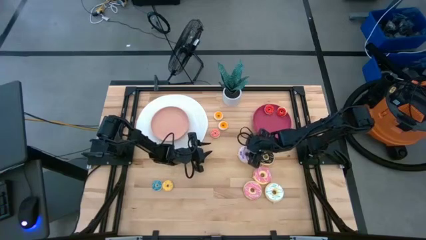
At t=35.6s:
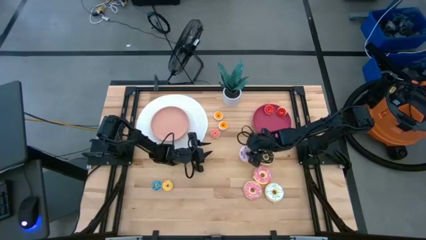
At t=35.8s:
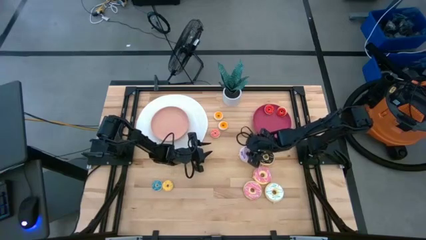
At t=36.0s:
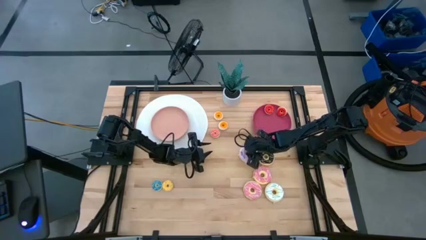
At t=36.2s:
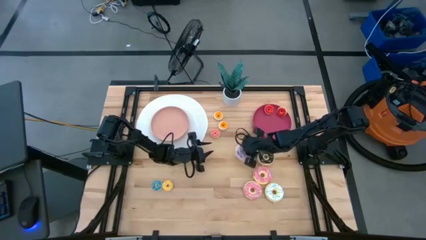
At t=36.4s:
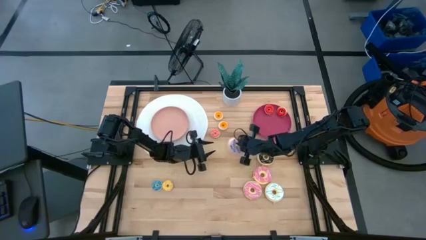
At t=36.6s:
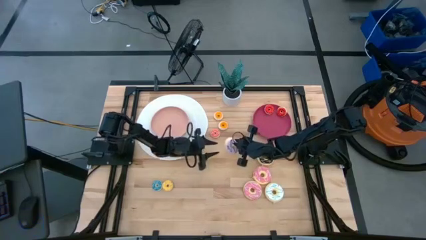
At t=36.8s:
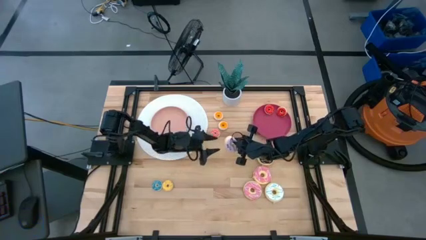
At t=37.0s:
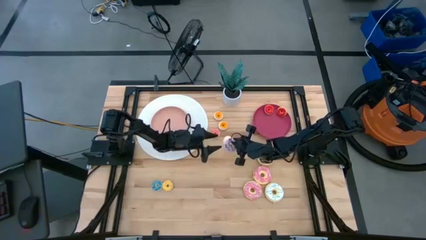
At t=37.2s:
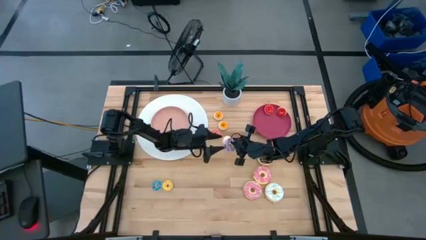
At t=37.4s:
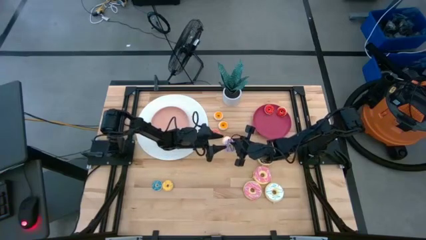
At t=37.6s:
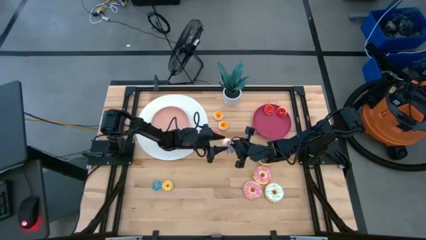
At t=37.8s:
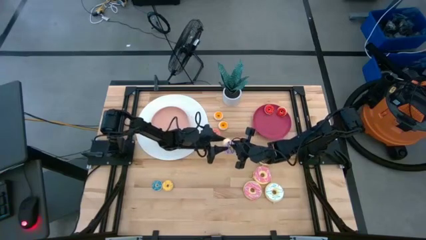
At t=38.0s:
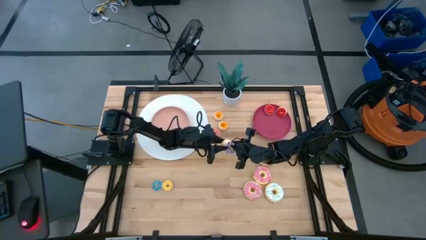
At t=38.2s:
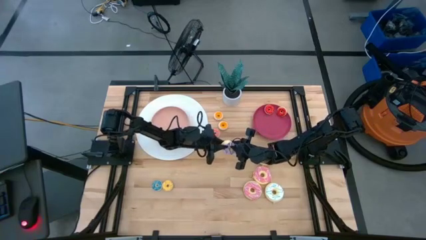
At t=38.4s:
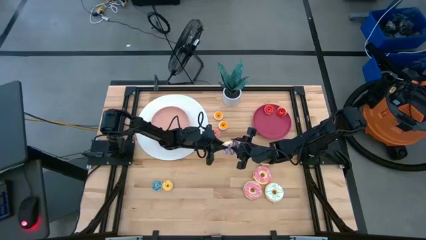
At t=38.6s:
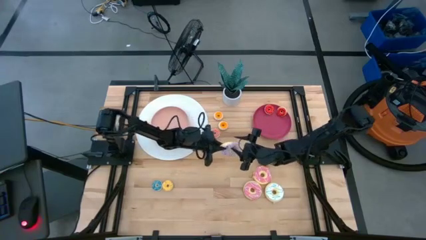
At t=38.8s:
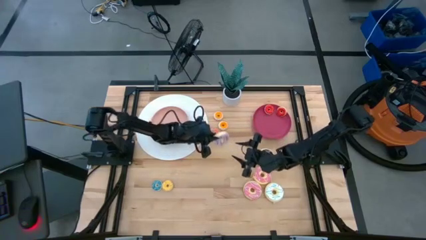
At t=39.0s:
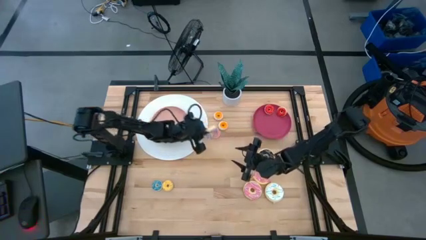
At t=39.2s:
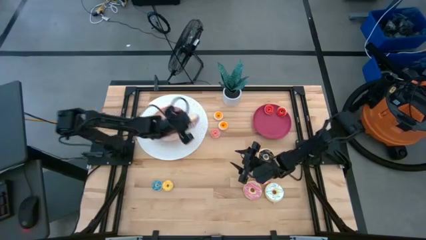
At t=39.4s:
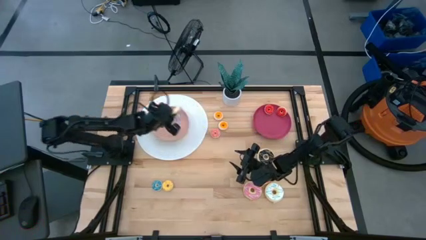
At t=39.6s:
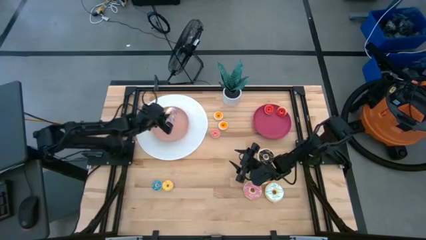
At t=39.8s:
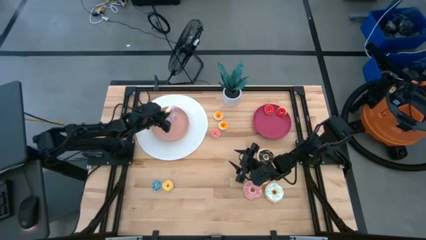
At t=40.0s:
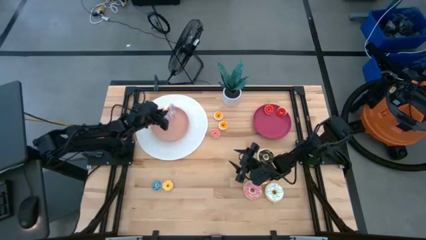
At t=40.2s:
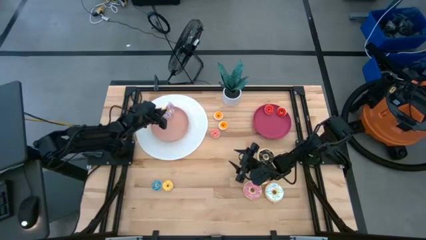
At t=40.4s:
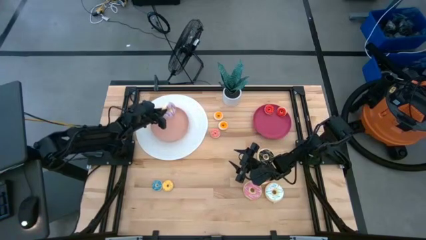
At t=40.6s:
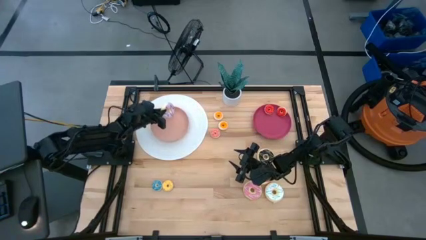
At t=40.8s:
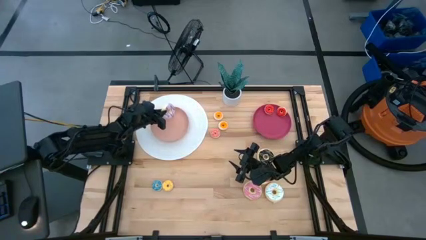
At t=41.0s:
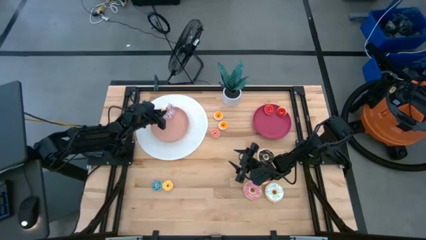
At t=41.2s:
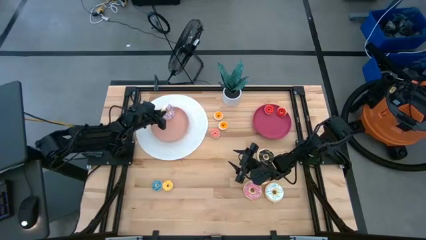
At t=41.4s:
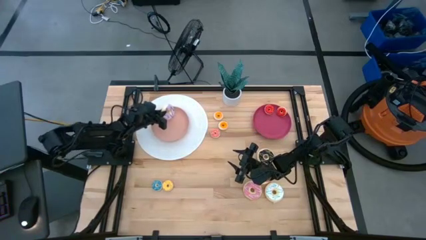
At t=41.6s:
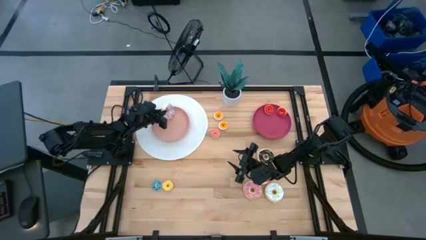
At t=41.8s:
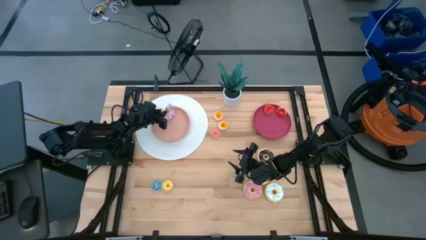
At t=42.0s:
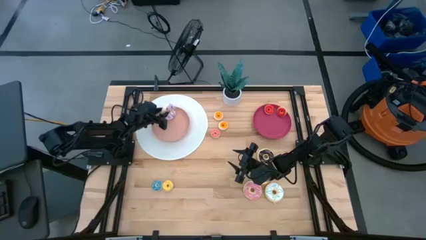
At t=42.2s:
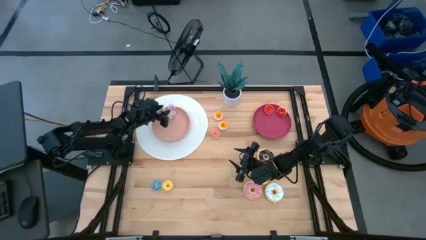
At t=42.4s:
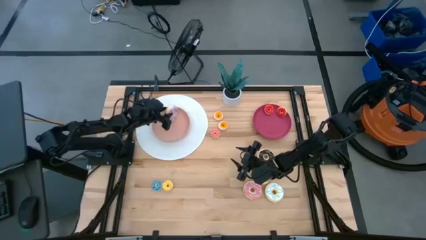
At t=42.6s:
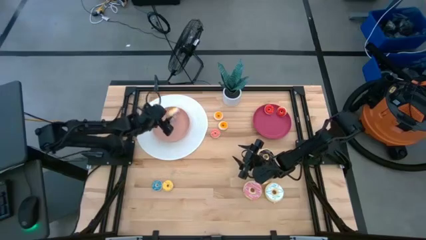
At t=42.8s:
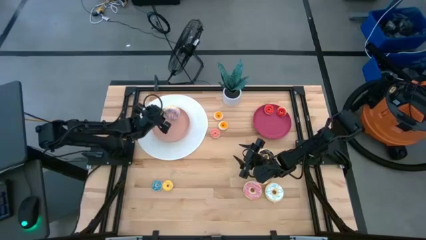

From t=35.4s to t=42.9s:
Task: Pick & Place donuts
Put the large purple donut on the pink plate

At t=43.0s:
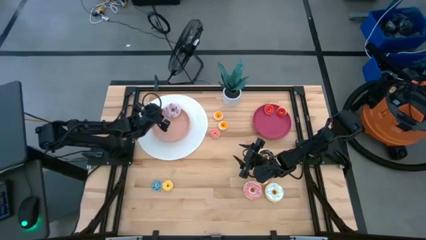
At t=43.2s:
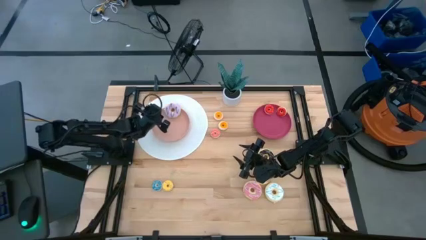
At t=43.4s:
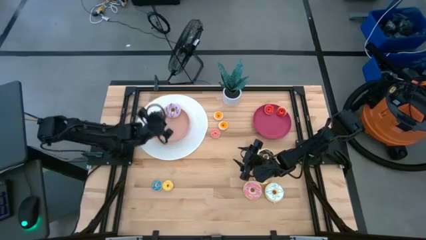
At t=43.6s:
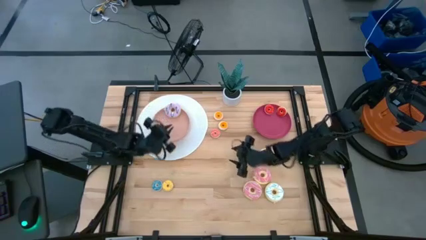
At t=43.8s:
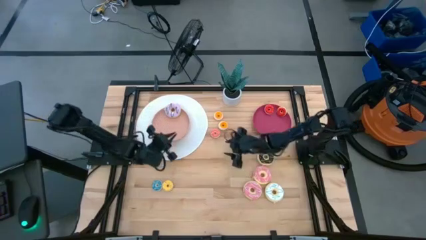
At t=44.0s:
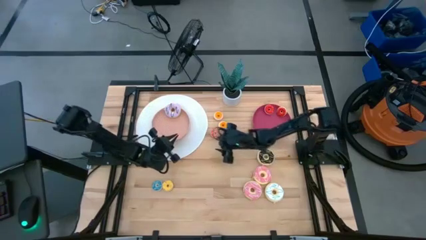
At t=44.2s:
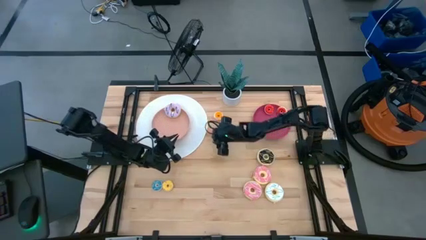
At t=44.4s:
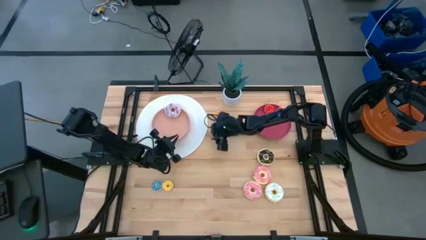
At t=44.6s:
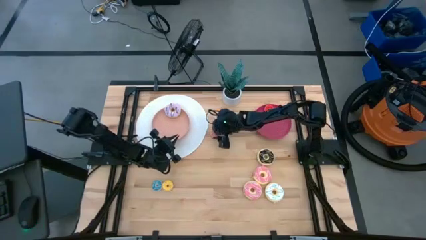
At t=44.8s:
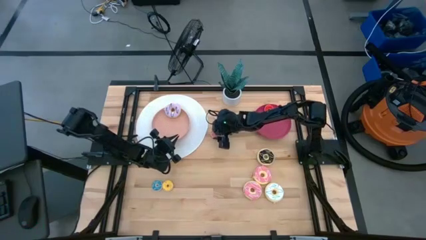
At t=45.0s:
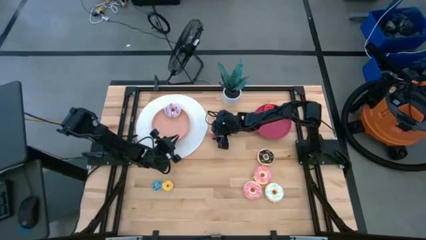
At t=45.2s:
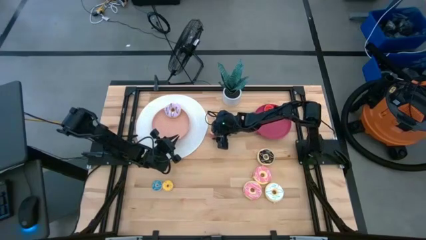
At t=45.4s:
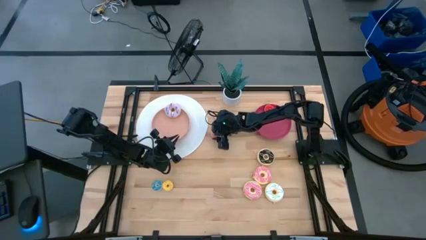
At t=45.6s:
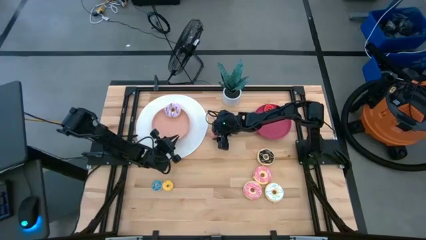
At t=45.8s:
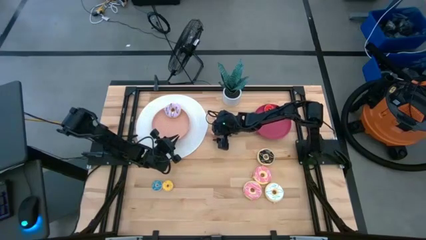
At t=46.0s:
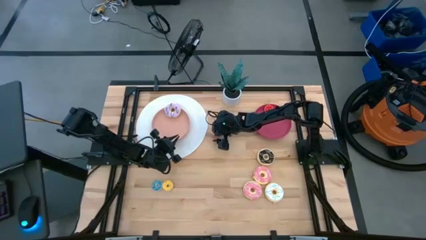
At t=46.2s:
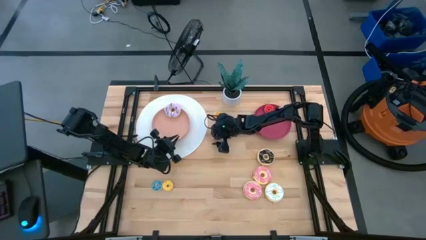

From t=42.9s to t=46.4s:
Put the small pink donut on the red plate

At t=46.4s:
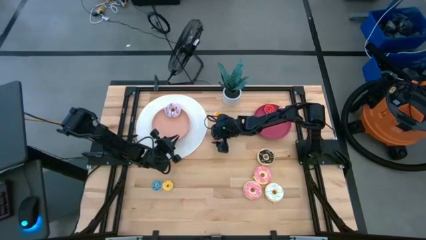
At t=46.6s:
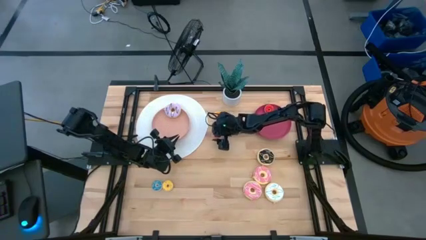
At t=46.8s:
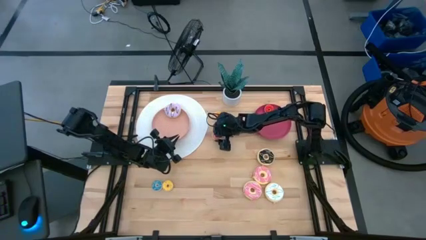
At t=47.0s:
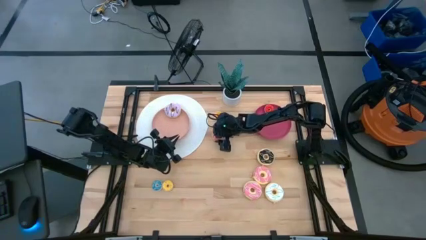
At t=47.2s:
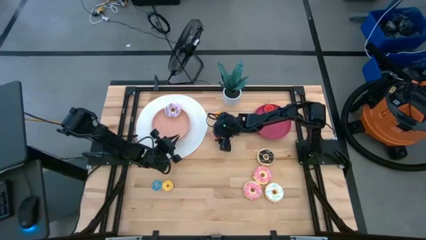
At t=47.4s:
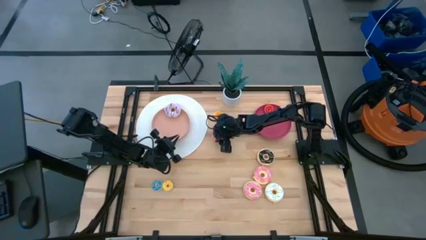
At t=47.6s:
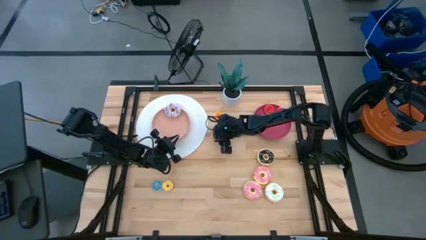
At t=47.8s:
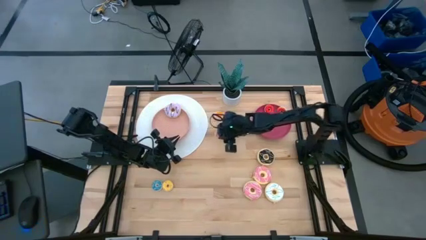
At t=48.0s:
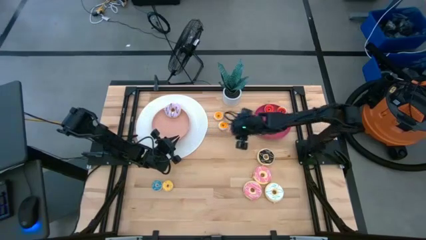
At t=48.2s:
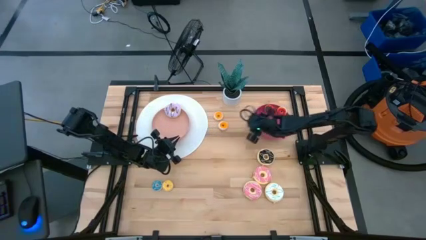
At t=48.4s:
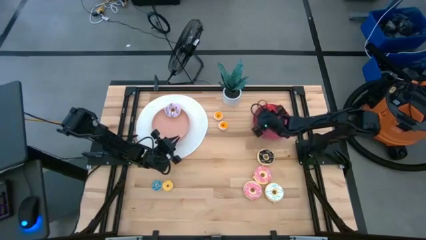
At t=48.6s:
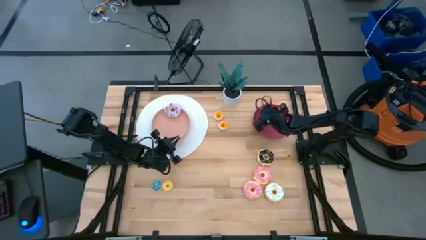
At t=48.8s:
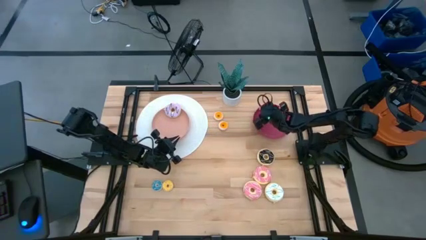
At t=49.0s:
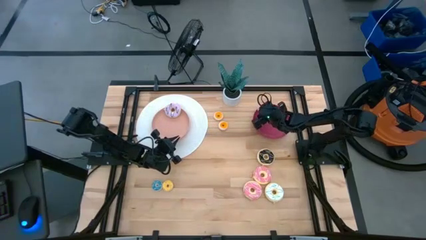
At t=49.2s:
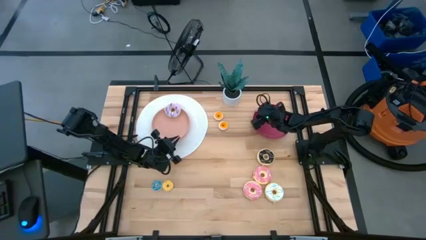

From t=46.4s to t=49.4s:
Put the small pink donut on the red plate

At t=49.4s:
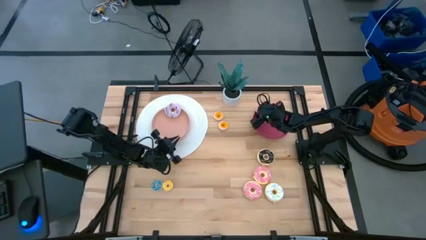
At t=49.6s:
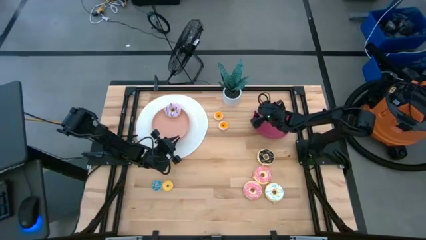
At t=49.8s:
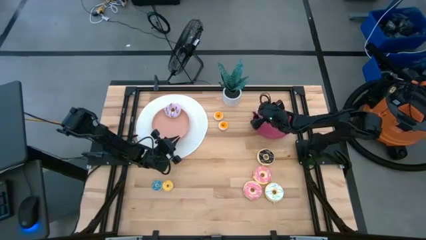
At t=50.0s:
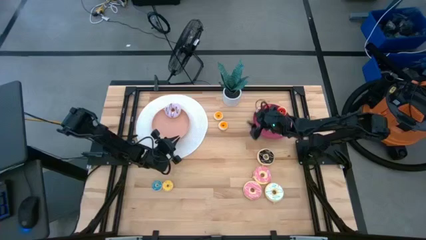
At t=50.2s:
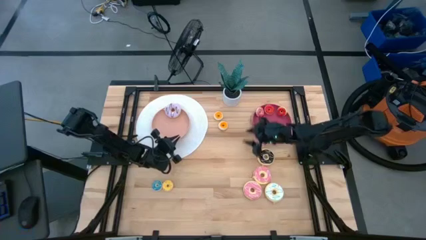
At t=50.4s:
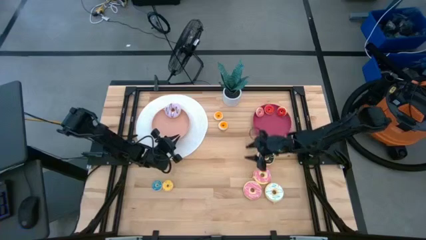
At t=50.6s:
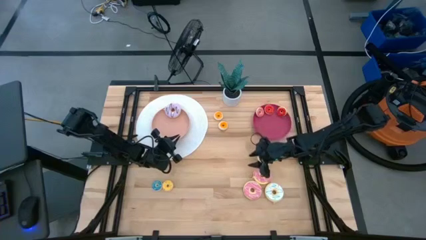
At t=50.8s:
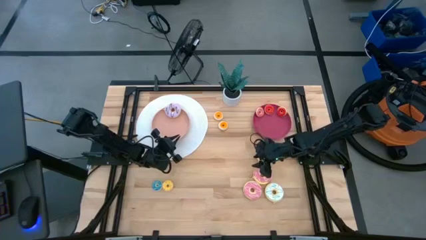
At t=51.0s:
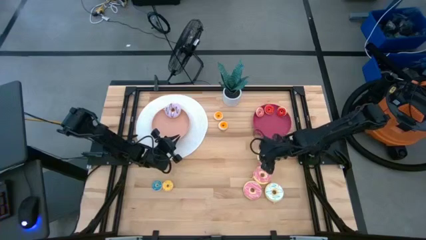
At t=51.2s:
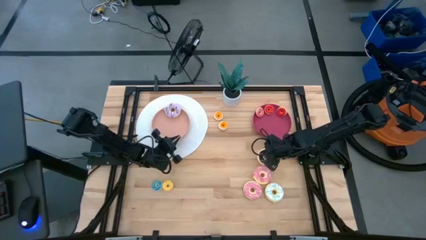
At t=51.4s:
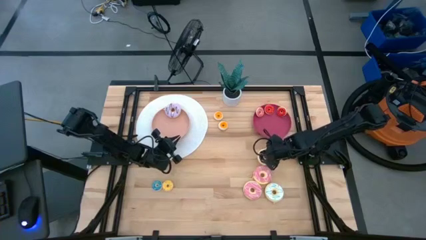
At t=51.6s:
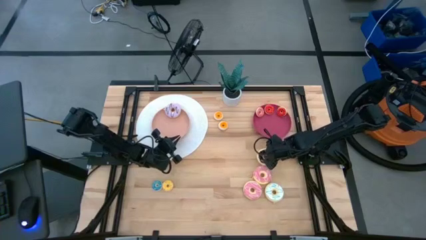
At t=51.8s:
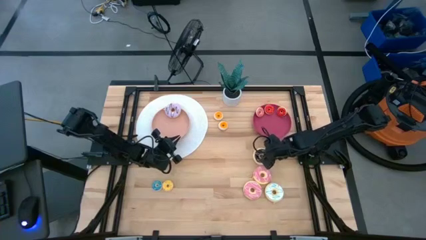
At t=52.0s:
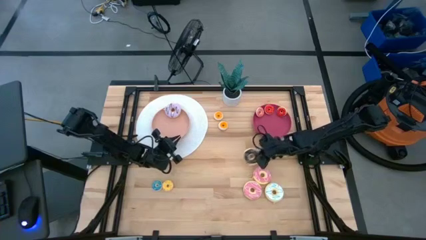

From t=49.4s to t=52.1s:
Put the large black donut on the pink plate
